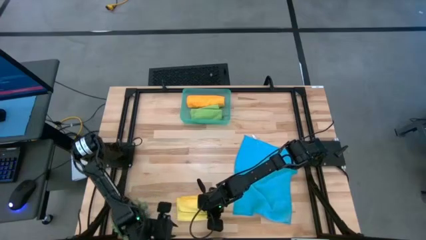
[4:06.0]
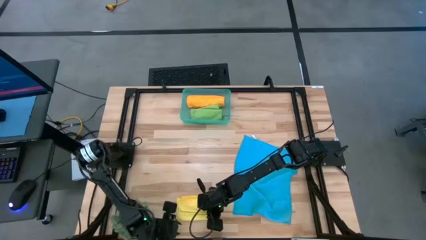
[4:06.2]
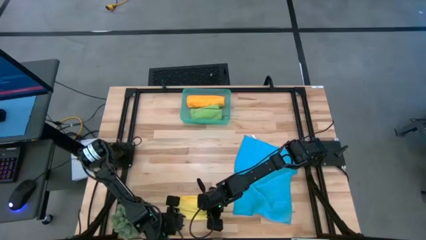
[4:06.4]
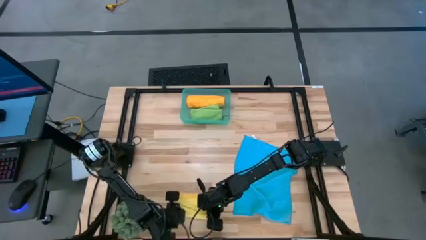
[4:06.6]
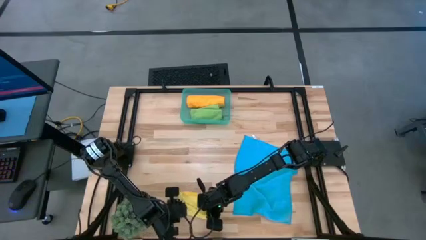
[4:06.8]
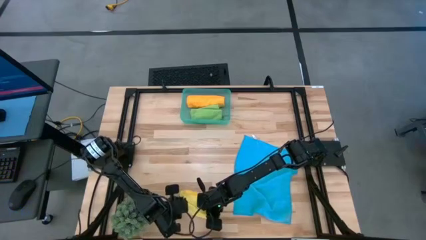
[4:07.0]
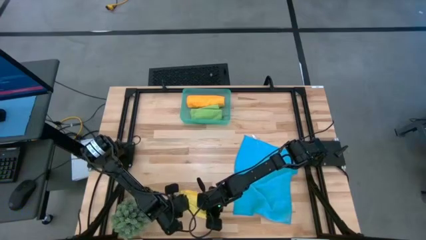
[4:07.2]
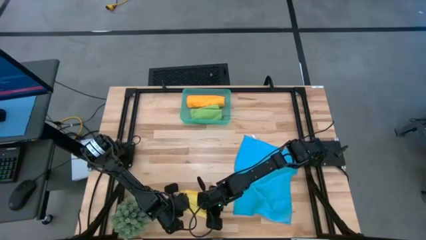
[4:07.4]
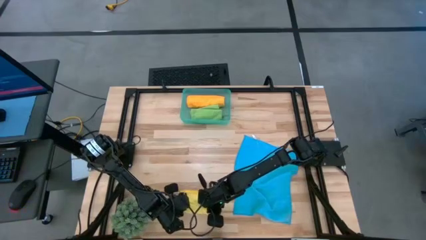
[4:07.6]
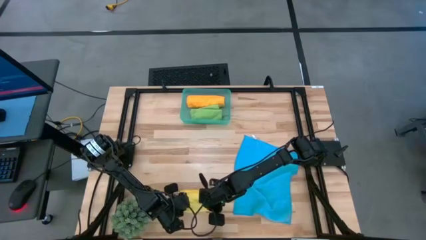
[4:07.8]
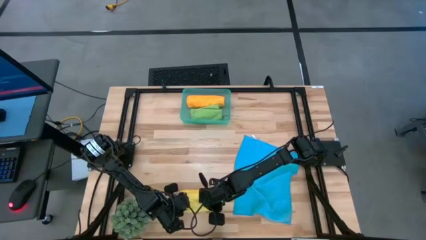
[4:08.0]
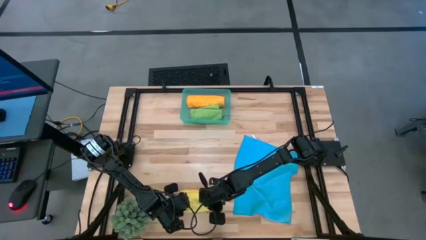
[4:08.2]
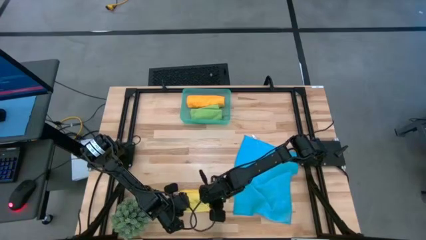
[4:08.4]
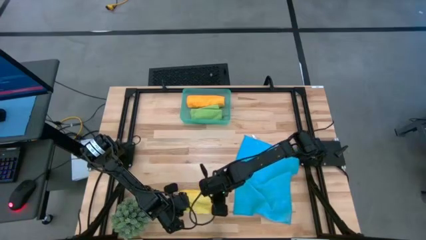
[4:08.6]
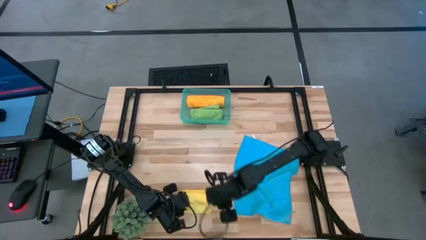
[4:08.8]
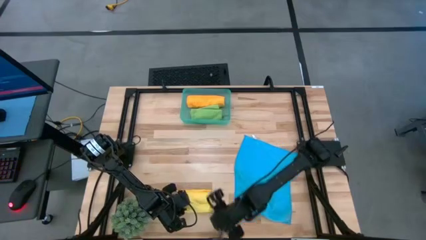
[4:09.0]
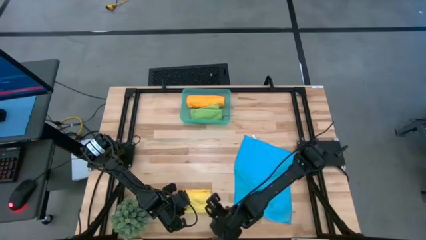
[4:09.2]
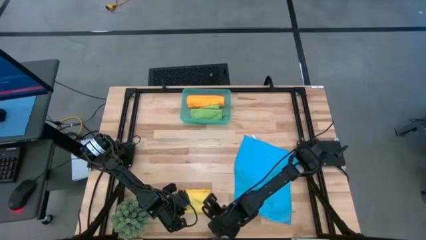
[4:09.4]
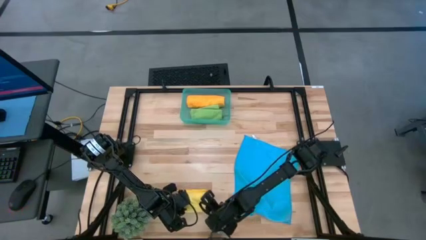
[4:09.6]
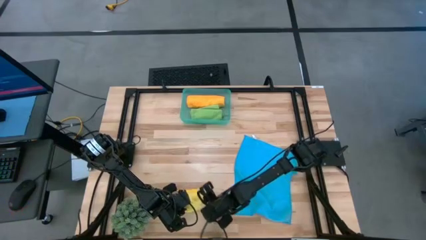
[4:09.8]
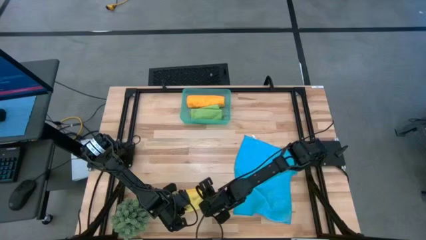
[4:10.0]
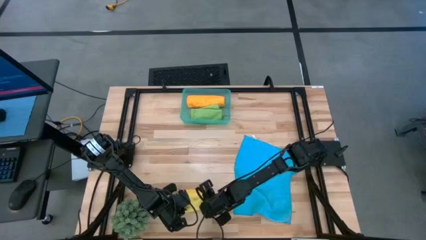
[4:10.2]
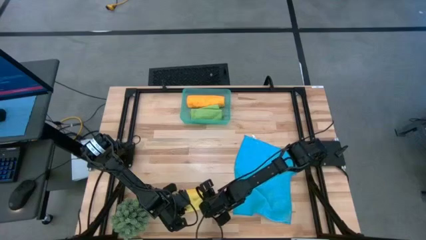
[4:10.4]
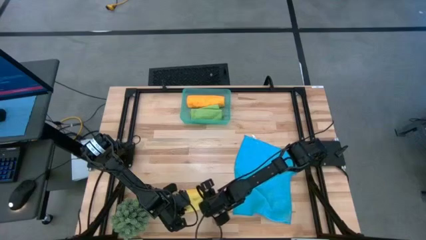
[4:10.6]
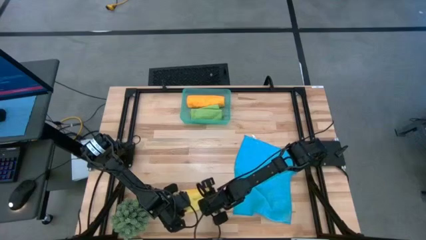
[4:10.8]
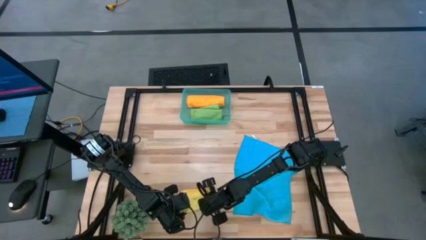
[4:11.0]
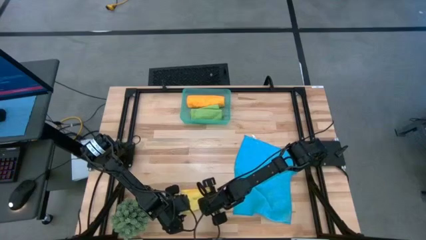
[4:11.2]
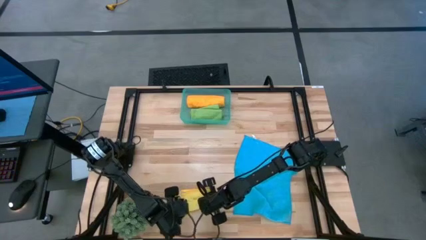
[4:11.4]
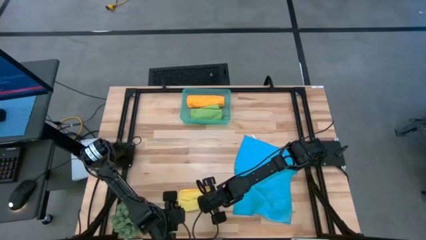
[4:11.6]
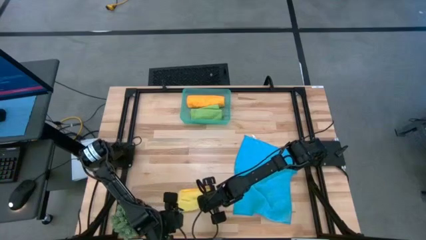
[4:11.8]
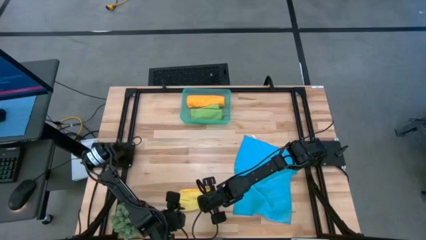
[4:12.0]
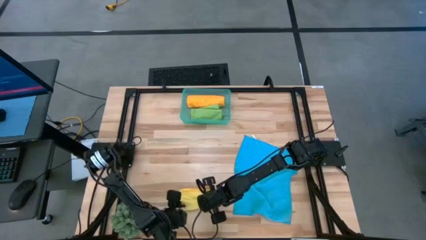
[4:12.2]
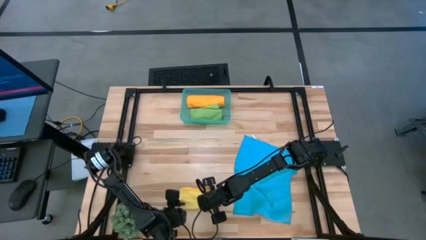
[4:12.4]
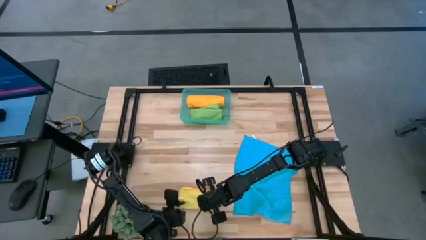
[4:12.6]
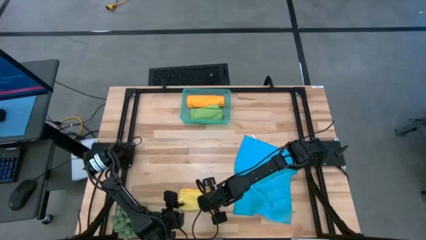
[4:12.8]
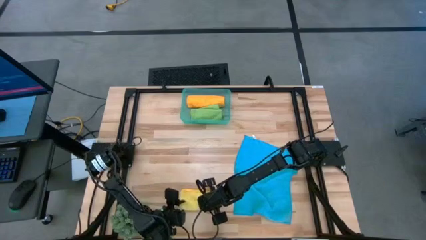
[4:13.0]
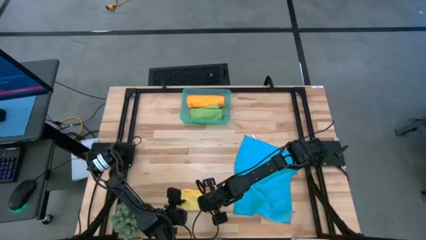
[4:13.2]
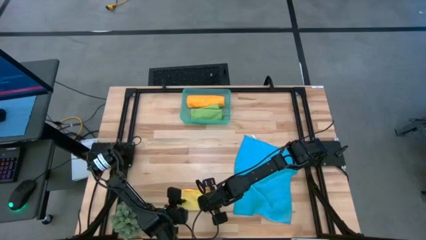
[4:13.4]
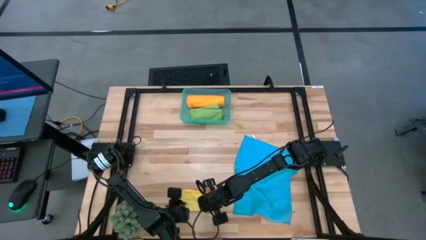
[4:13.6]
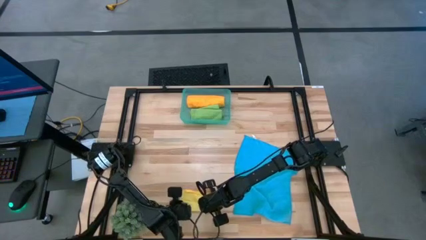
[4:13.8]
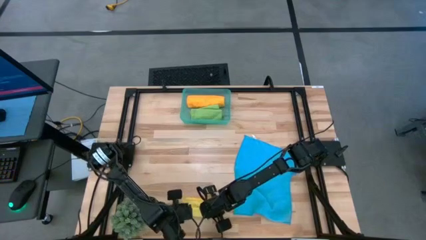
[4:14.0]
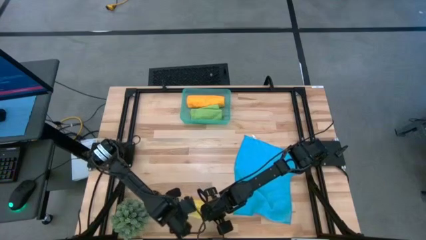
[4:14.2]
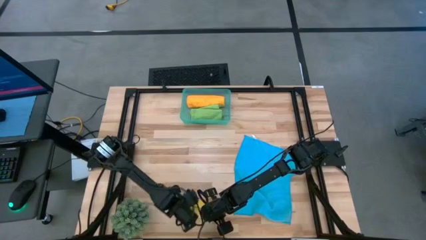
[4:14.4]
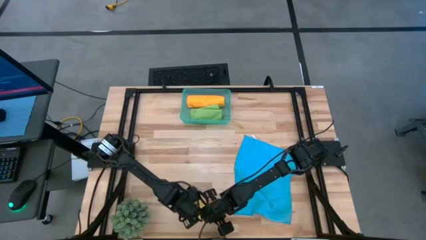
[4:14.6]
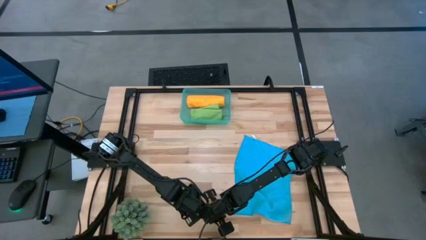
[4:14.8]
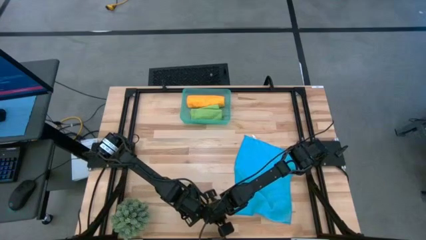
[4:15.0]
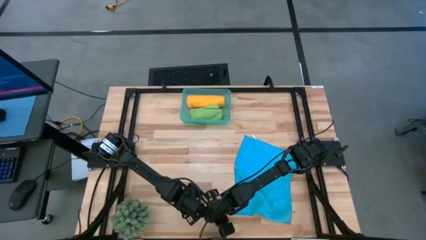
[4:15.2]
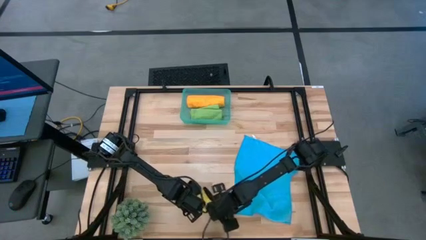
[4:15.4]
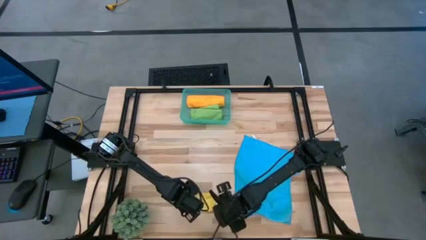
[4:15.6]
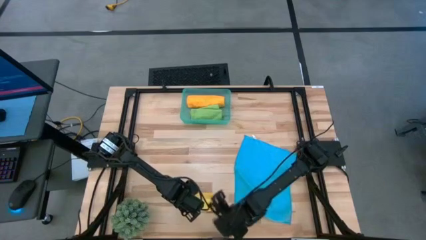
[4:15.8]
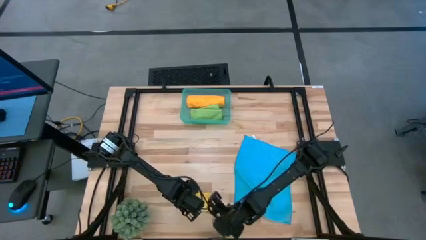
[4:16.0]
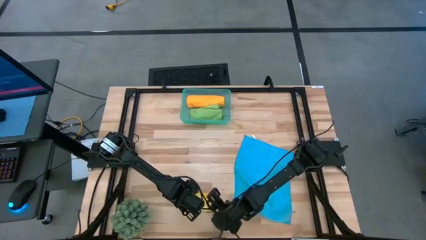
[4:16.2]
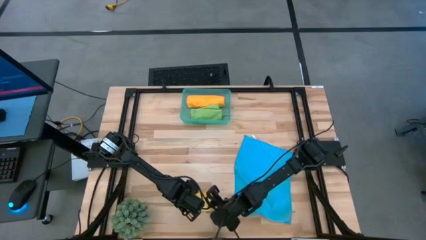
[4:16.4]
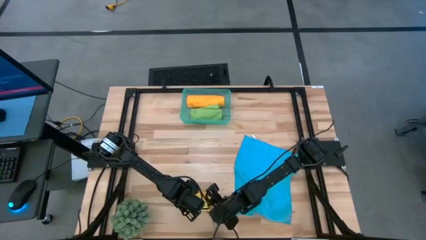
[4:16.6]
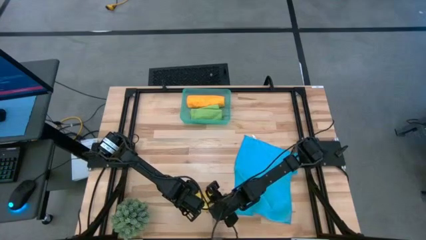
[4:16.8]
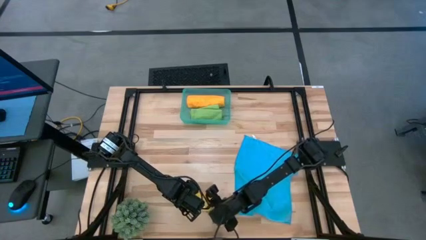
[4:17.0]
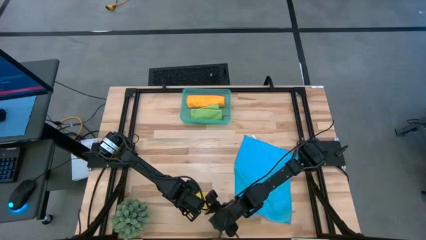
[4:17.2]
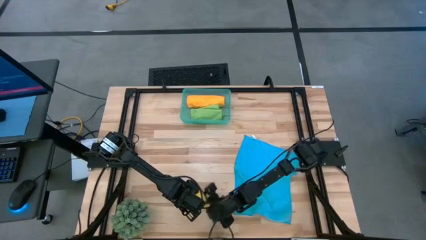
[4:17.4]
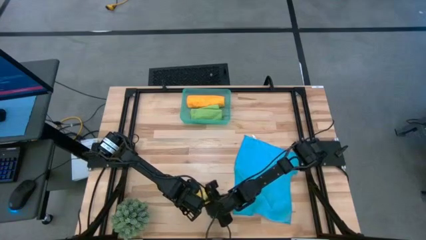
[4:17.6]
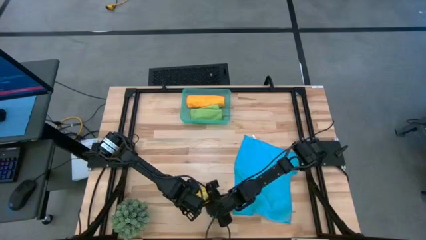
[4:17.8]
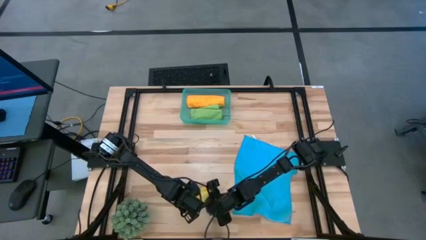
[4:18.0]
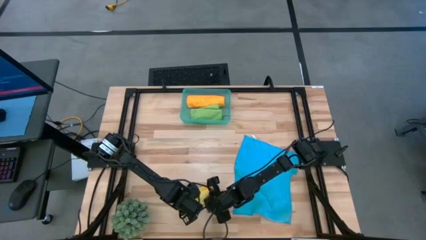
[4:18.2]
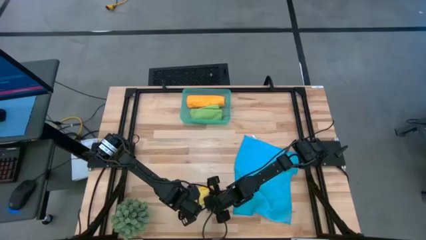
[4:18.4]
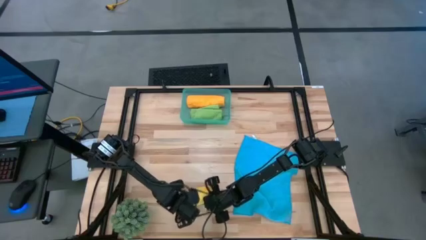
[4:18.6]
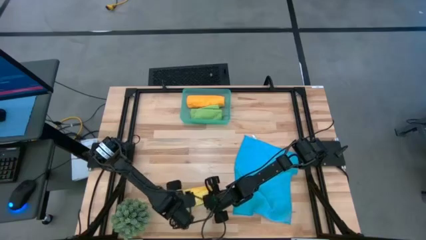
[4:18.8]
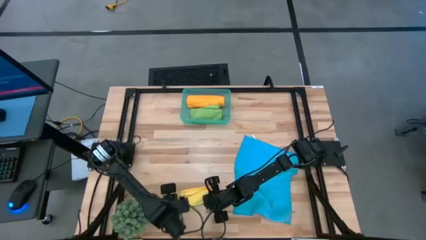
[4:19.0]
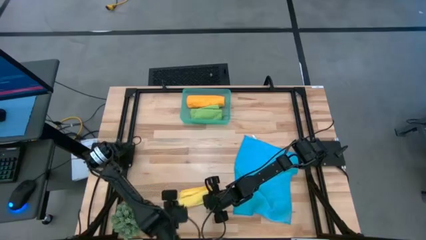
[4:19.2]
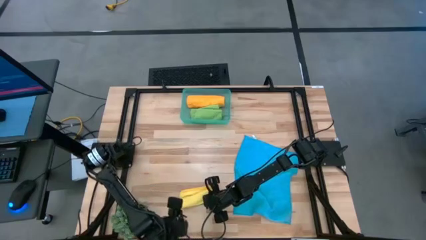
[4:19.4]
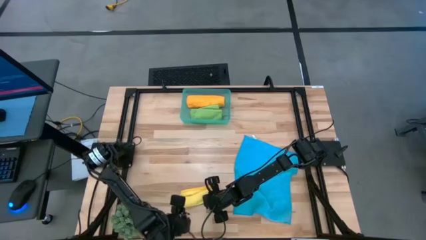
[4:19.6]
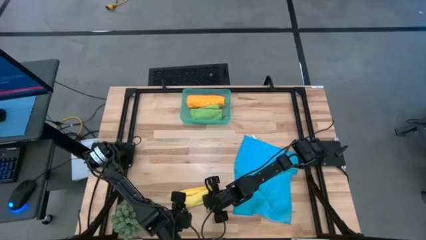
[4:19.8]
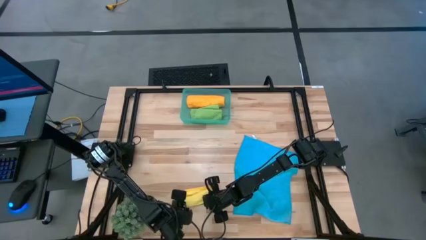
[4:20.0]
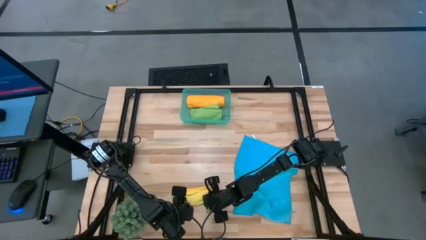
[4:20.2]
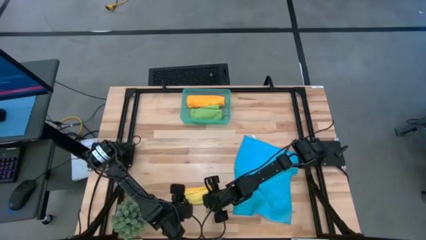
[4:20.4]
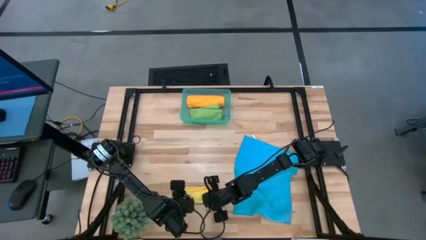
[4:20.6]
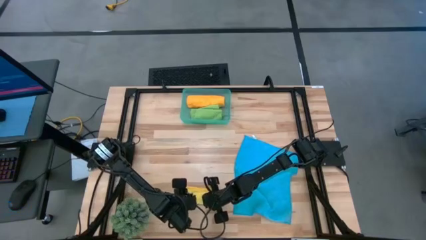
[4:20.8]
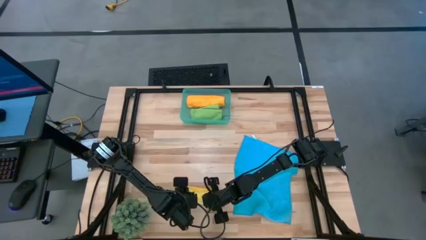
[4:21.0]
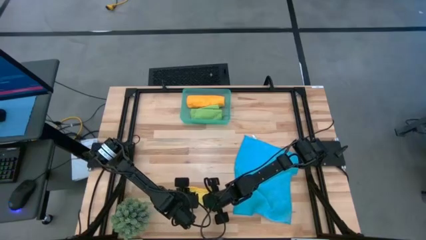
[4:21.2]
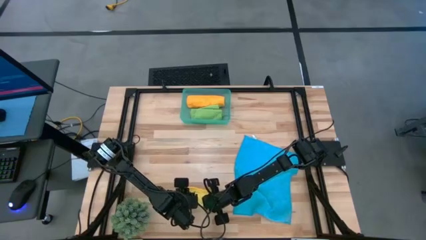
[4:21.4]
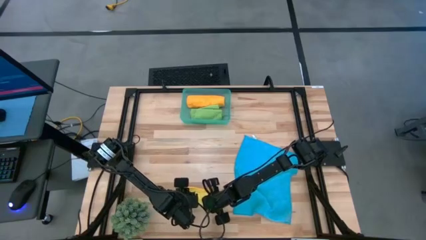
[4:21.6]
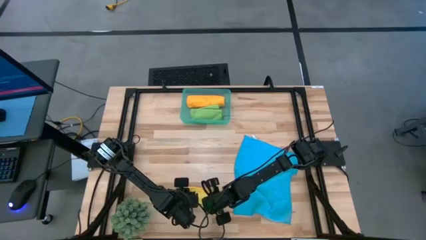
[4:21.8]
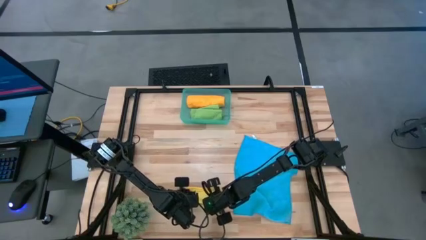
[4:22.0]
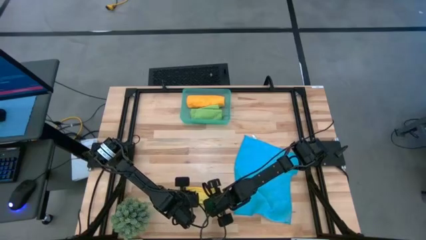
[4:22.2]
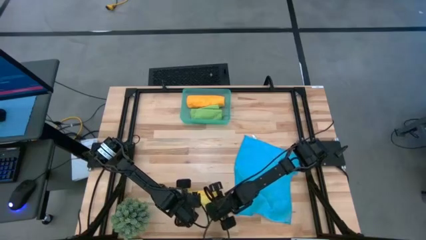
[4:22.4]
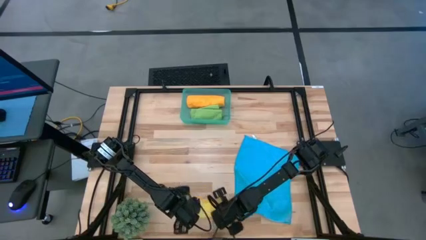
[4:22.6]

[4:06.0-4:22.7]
Task: Roll microfiber towels into tight, uniform cylinder then place into a basket
Fold the yellow towel
